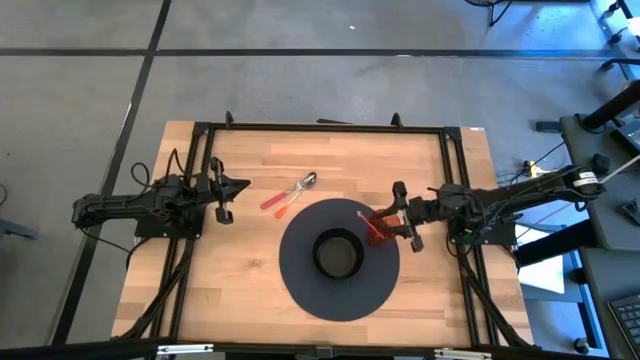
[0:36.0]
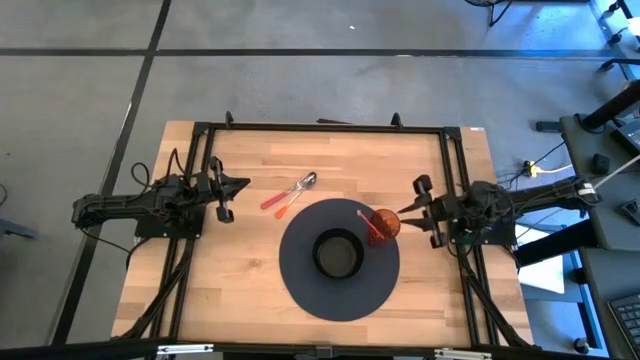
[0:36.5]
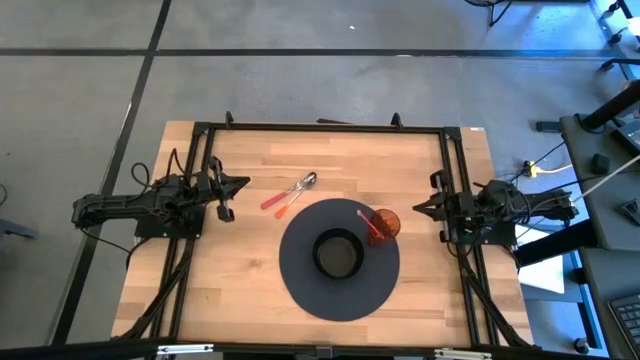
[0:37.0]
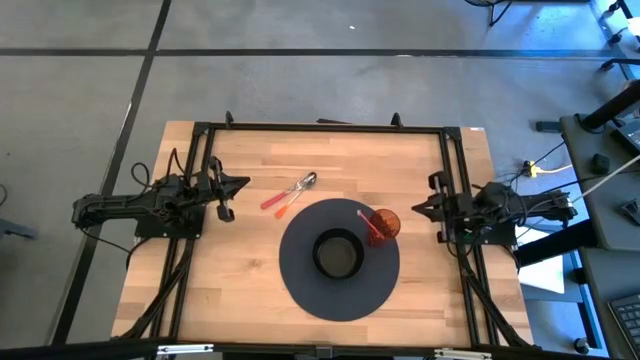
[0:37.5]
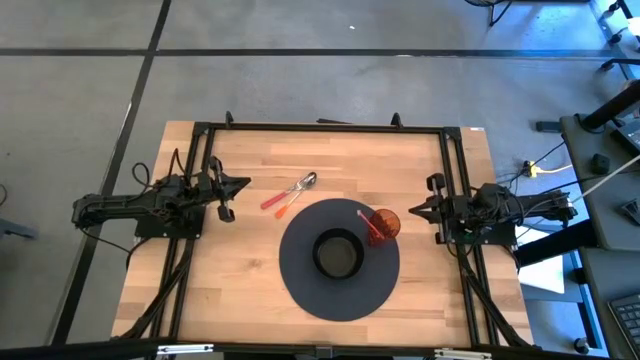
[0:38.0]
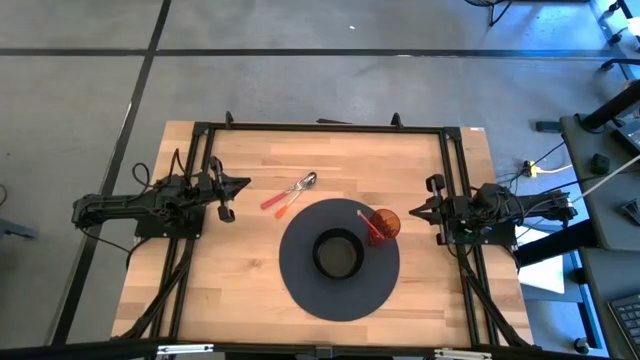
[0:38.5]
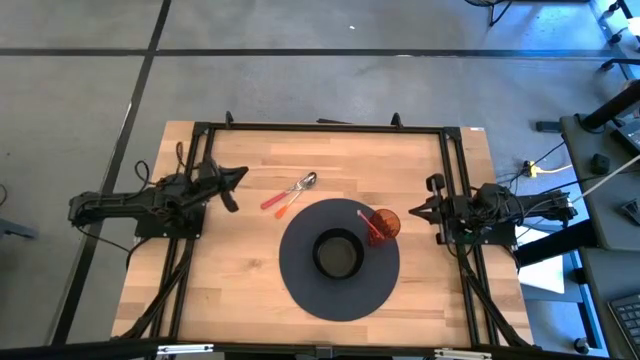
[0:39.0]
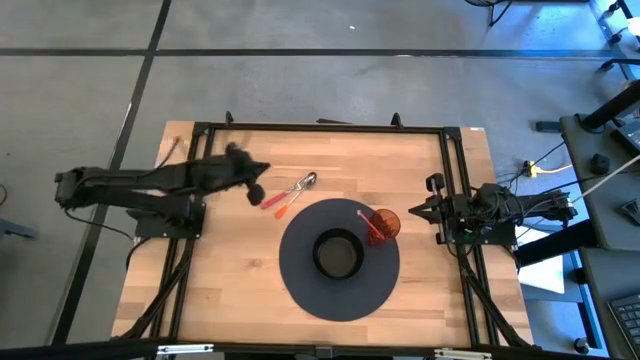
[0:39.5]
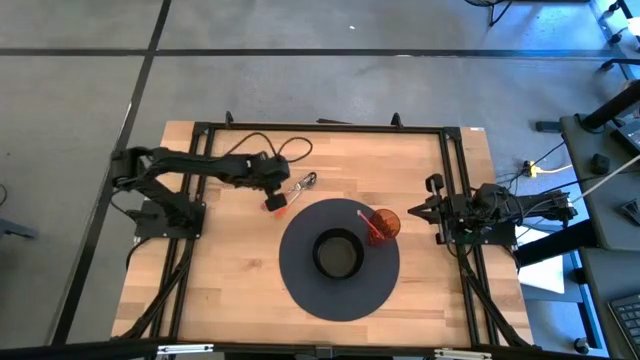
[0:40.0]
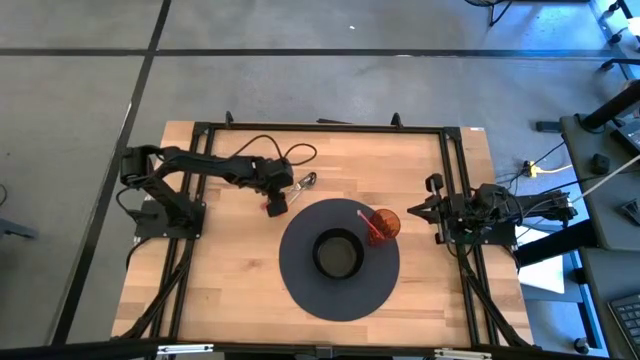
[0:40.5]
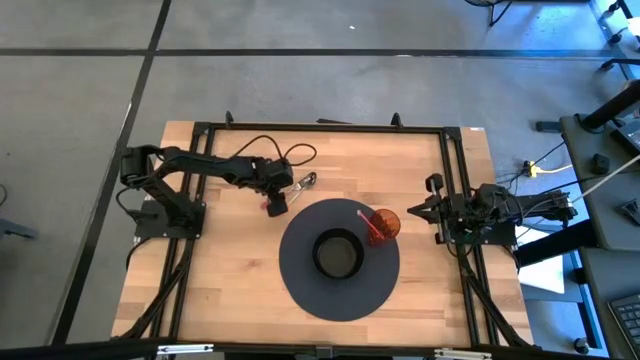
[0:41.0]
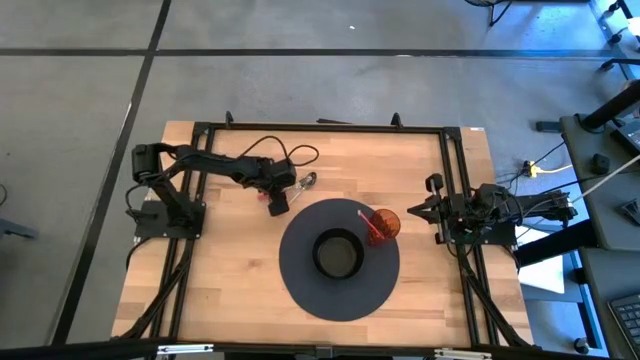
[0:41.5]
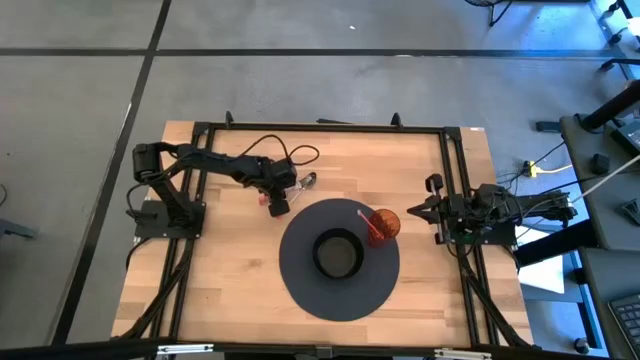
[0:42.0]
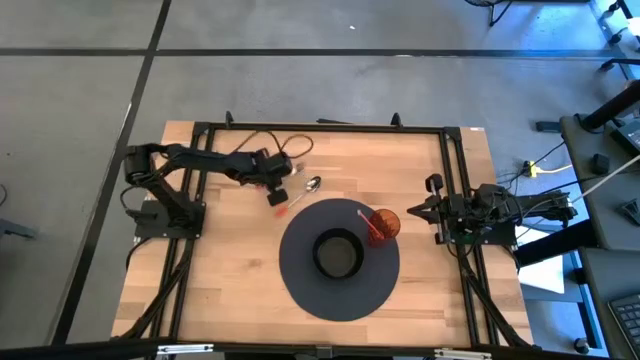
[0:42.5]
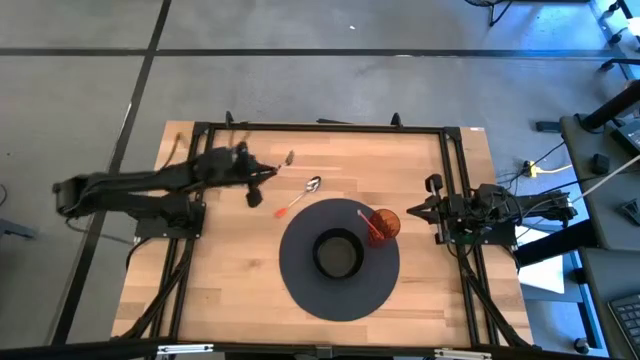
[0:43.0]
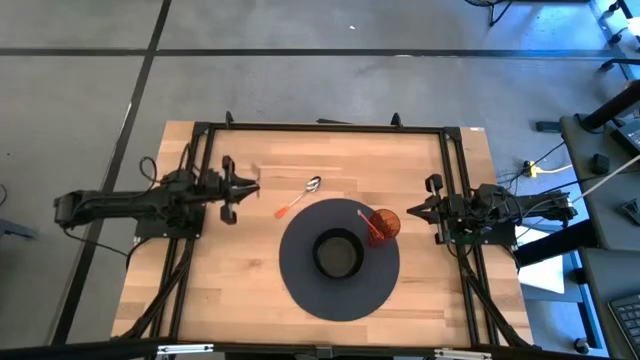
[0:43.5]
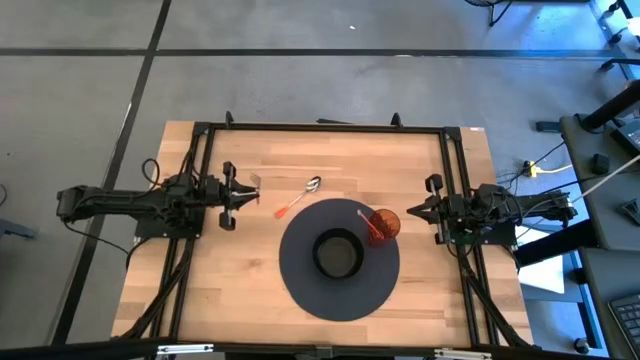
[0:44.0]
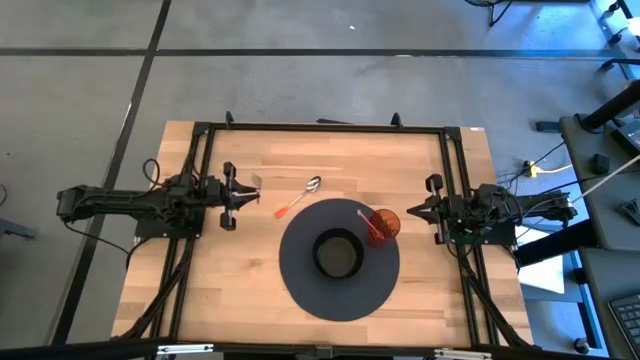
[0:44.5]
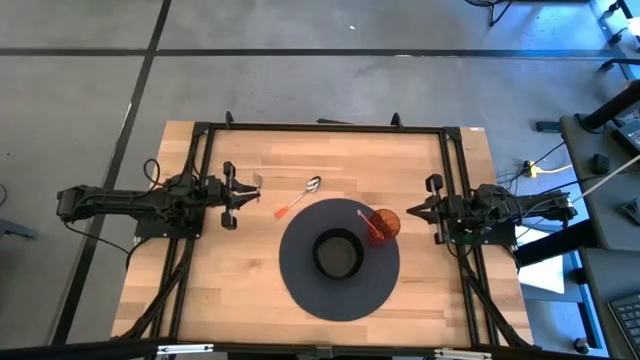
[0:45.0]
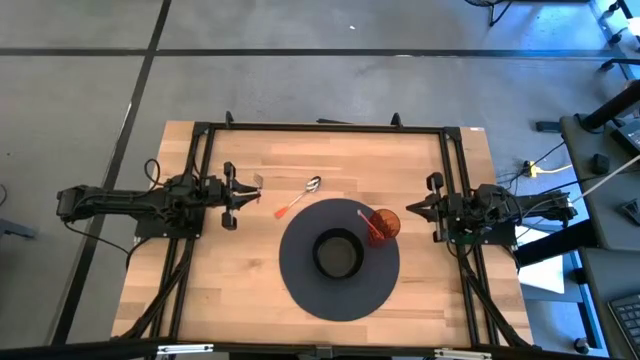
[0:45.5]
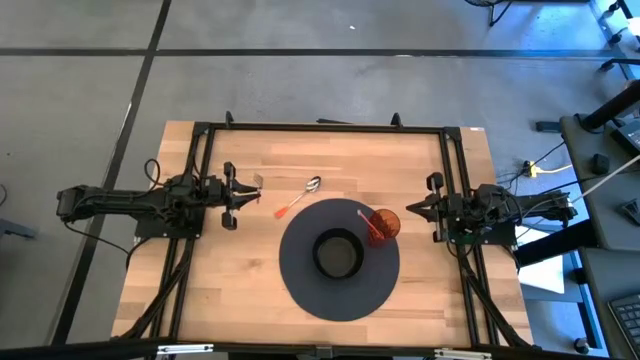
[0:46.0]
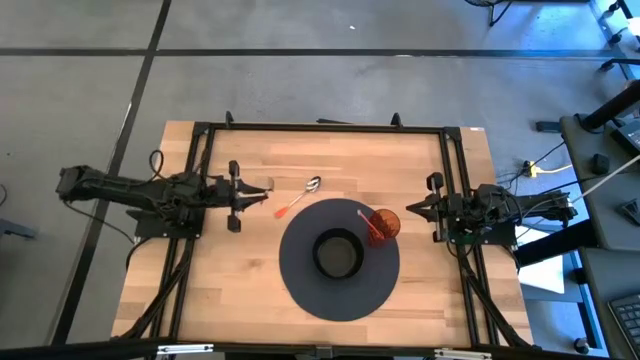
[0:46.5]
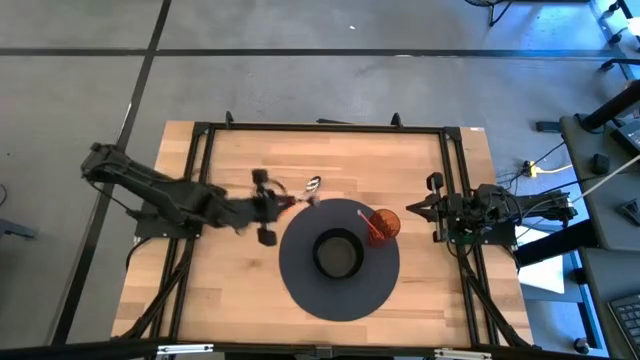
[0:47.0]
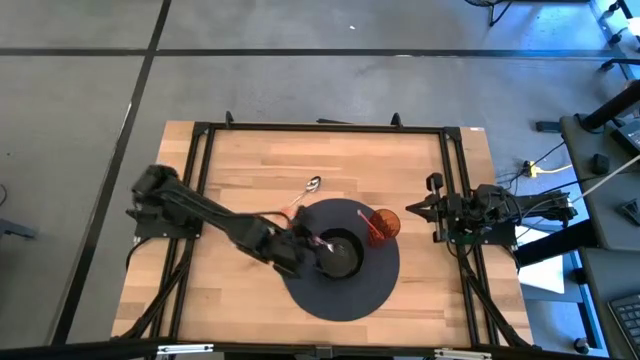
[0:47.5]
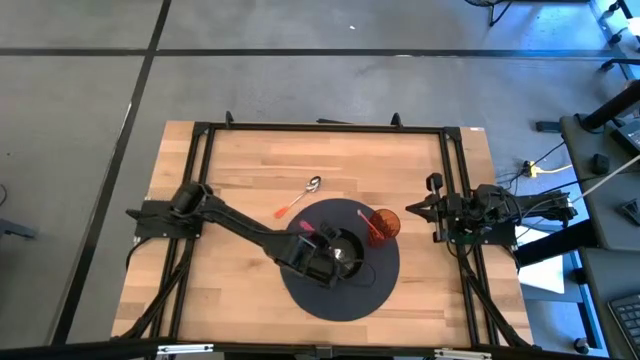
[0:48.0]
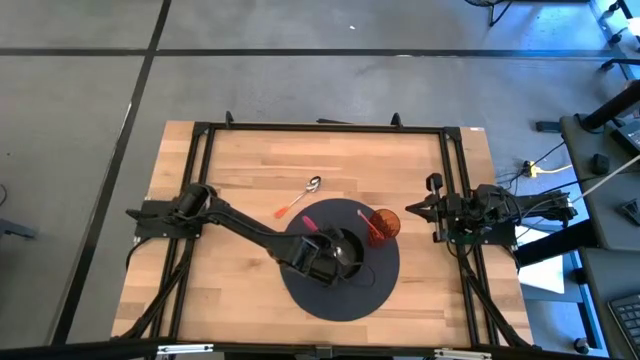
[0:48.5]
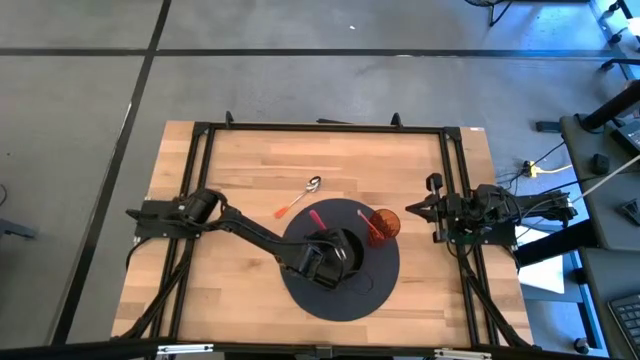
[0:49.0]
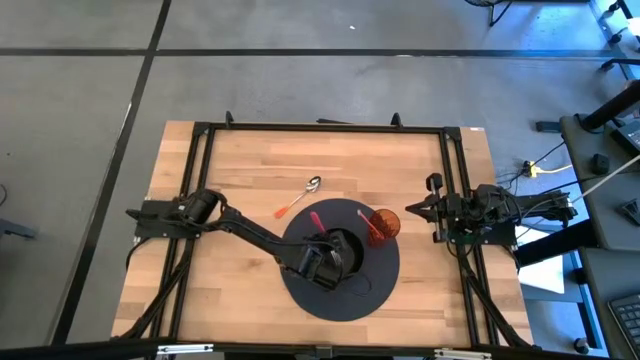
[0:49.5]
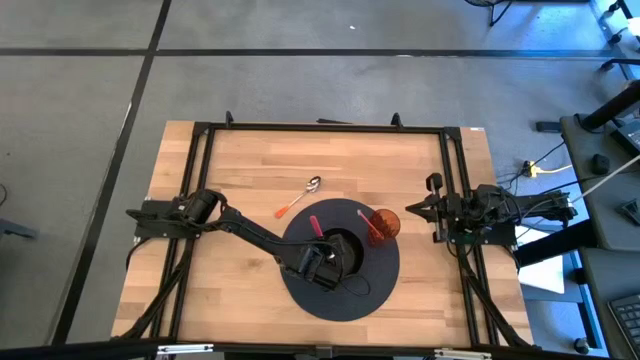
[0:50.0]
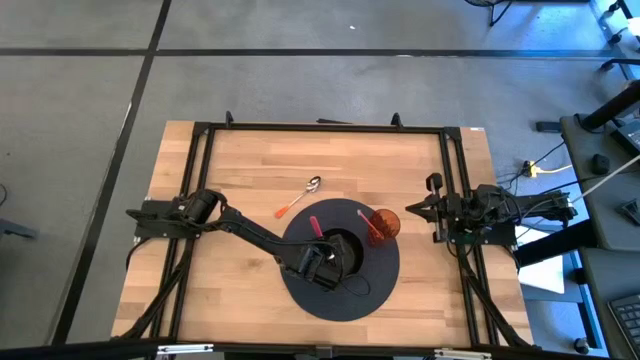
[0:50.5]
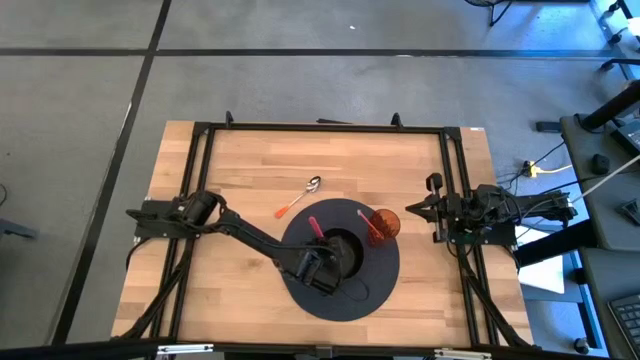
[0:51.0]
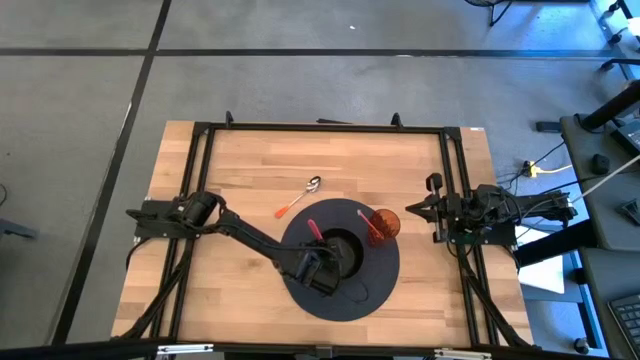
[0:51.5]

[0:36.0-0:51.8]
Task: Pick & Place Utensil
Put the fork into the bowl

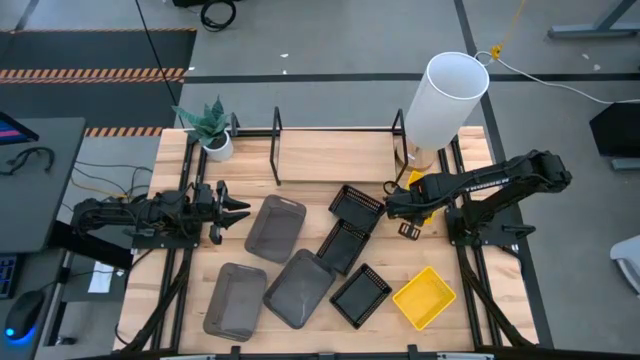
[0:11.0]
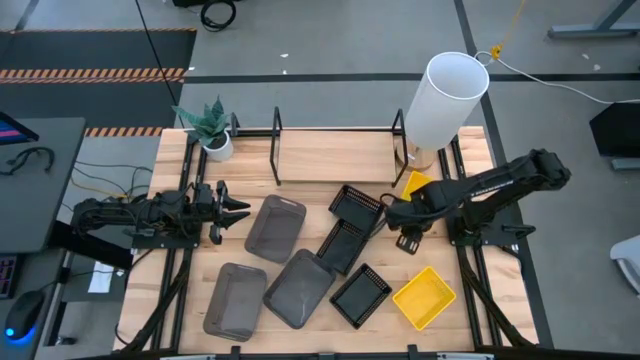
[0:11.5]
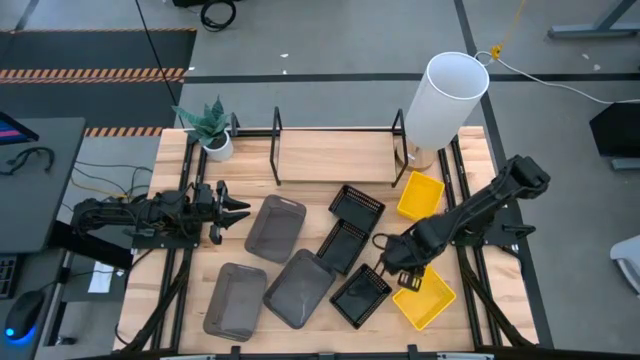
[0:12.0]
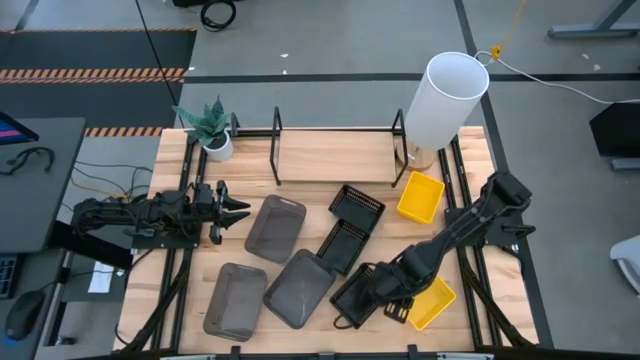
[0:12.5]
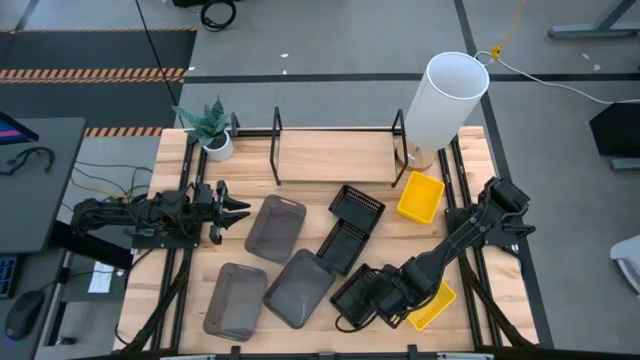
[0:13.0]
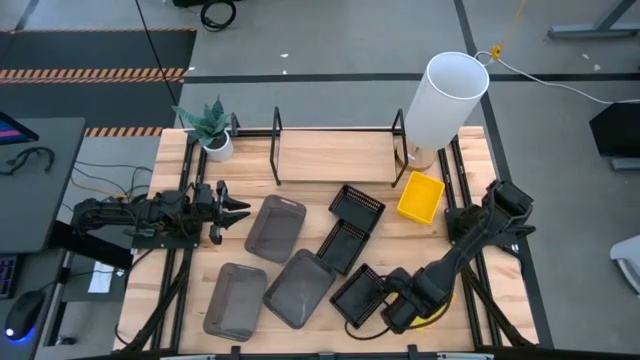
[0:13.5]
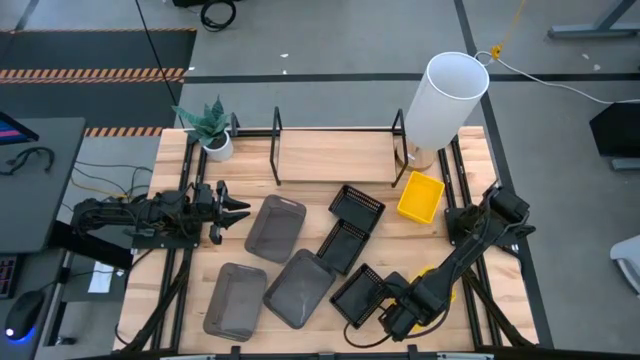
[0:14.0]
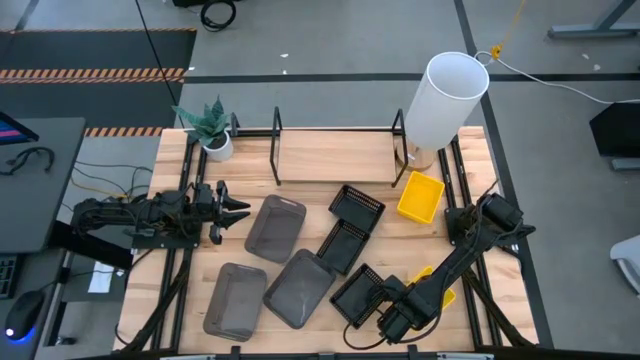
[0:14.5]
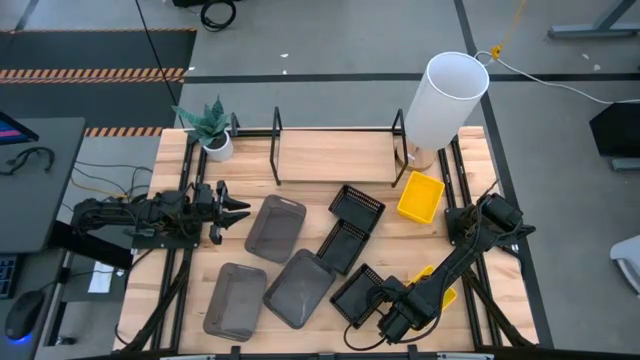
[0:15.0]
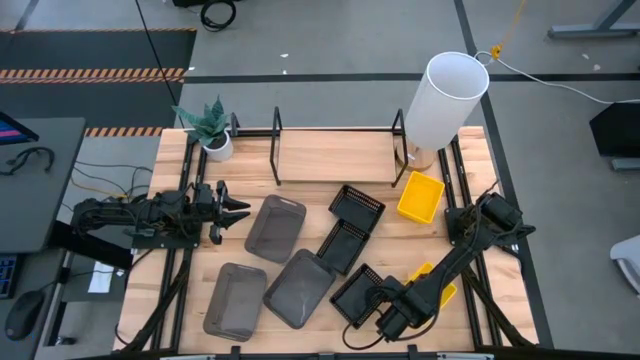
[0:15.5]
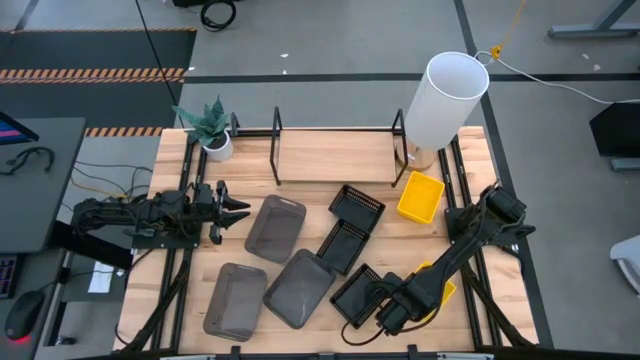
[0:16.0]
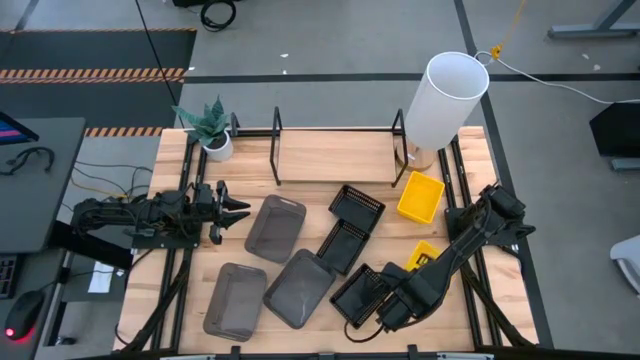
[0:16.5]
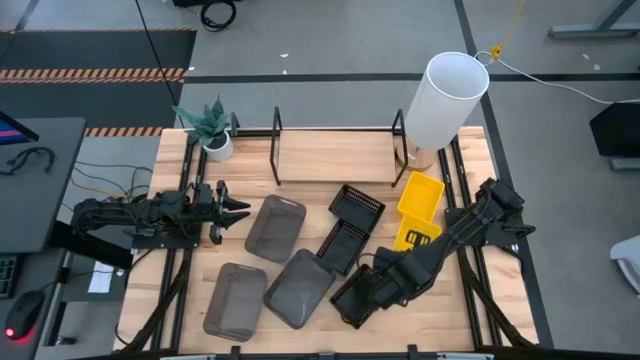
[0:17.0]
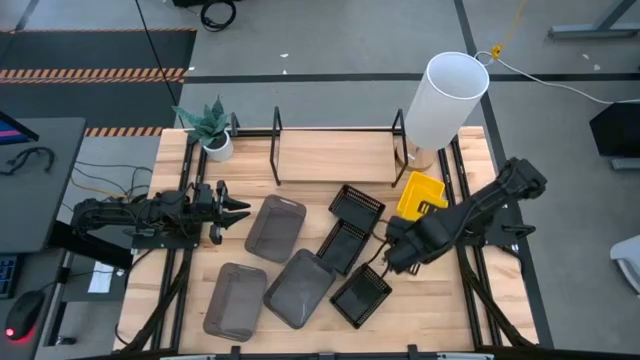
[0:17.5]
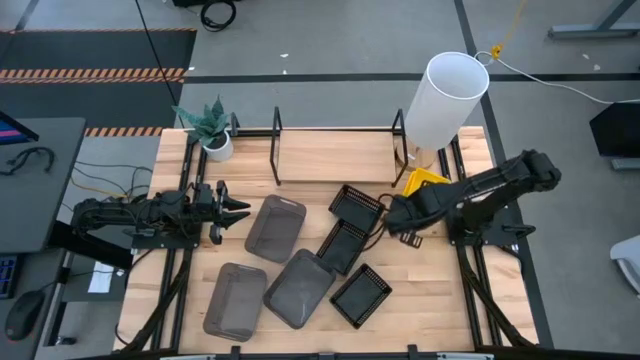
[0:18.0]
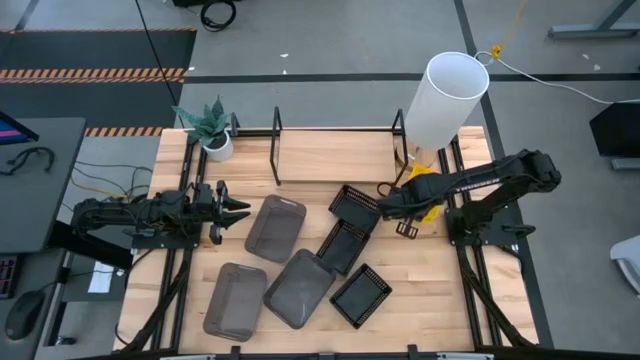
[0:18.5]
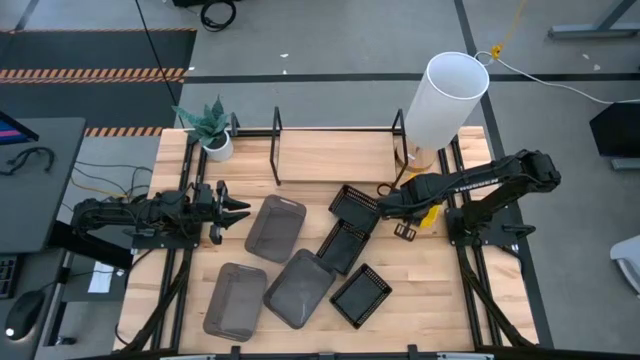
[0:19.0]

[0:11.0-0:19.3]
Task: Stack baskets on shelf by color
Stack the bottom yellow bin on top of the top yellow bin
